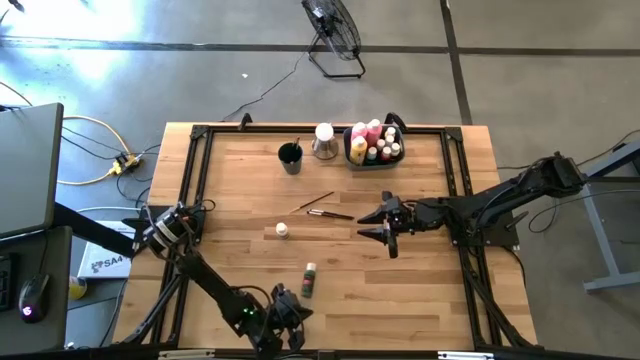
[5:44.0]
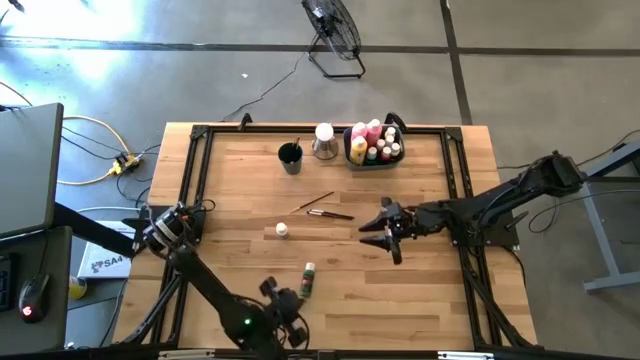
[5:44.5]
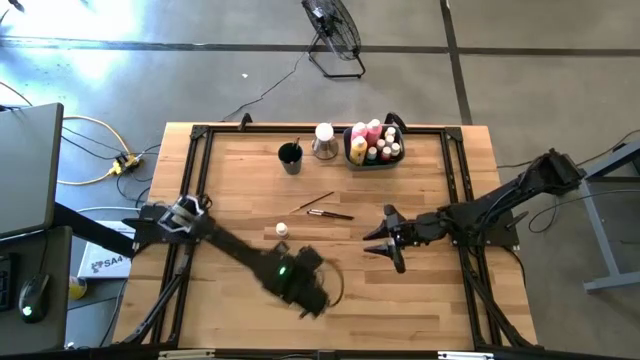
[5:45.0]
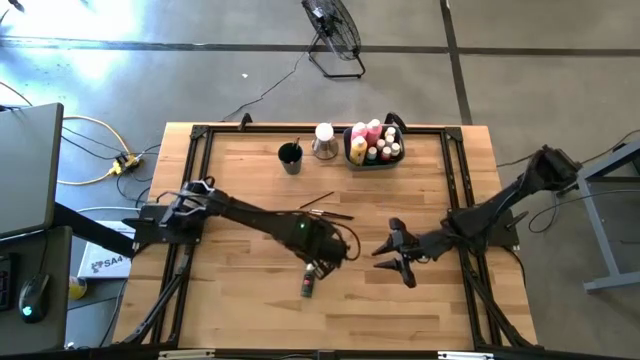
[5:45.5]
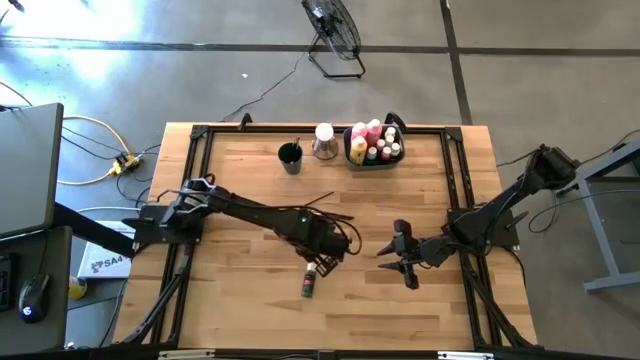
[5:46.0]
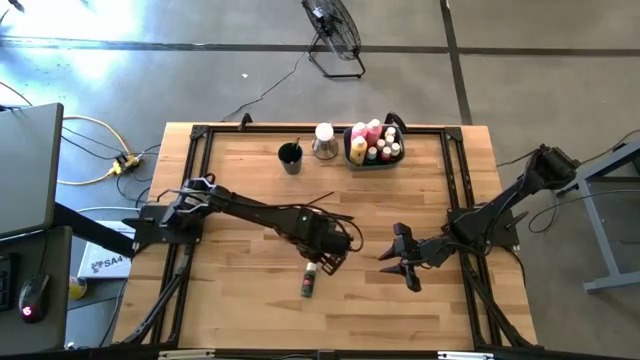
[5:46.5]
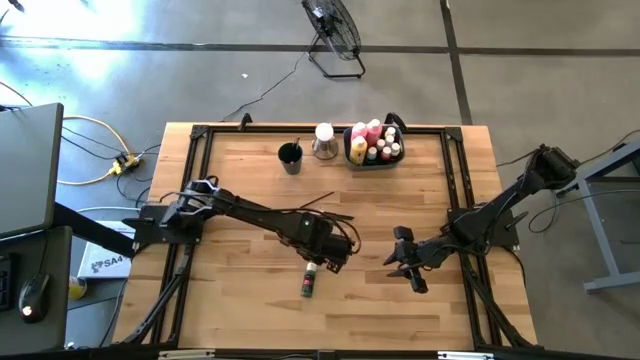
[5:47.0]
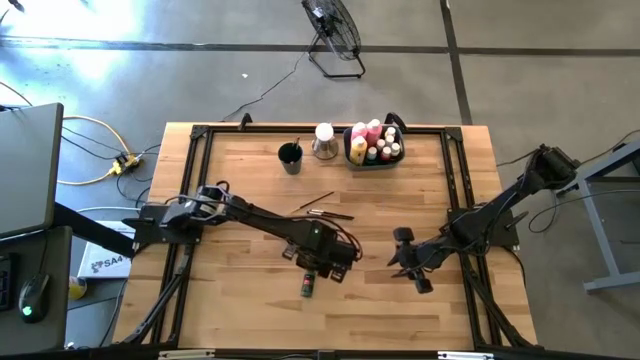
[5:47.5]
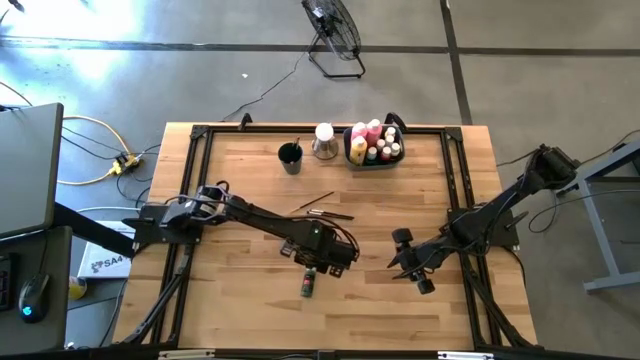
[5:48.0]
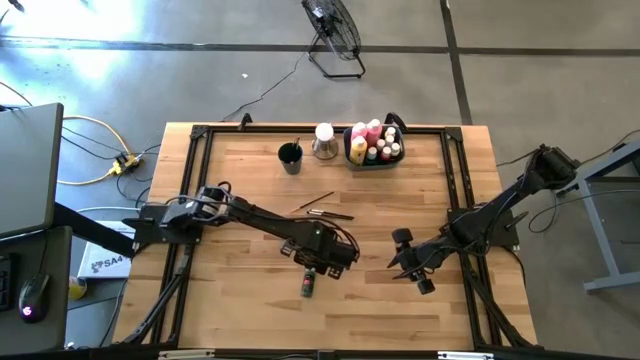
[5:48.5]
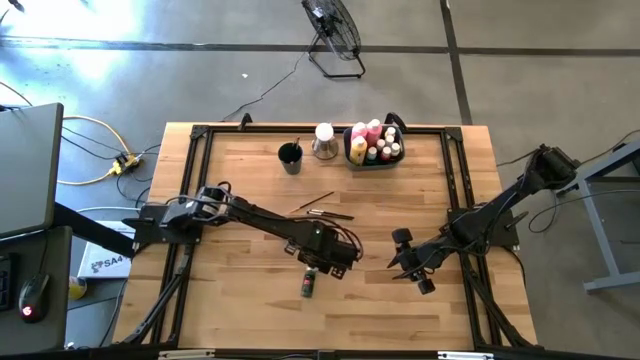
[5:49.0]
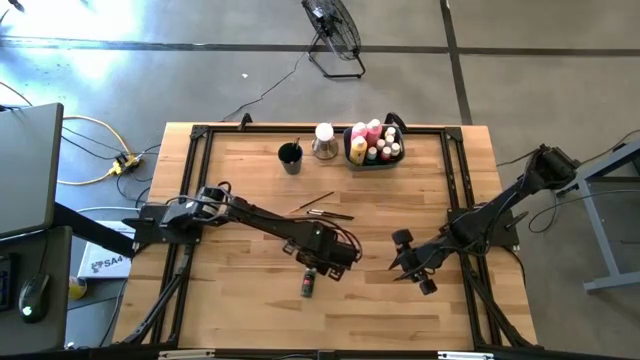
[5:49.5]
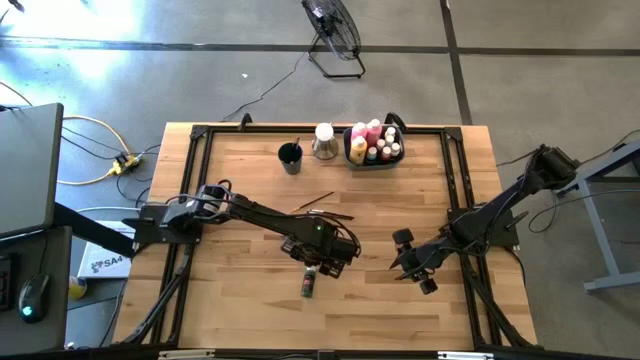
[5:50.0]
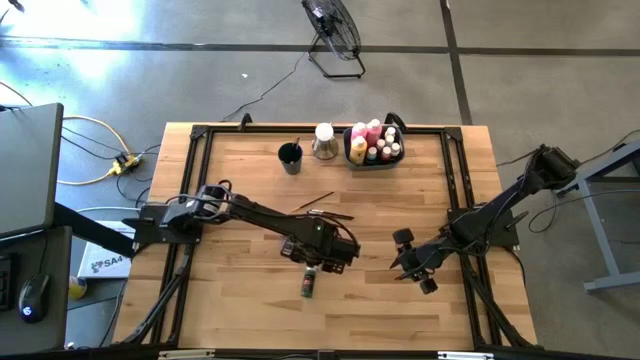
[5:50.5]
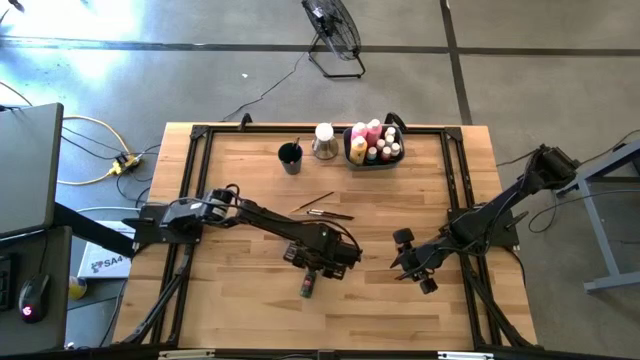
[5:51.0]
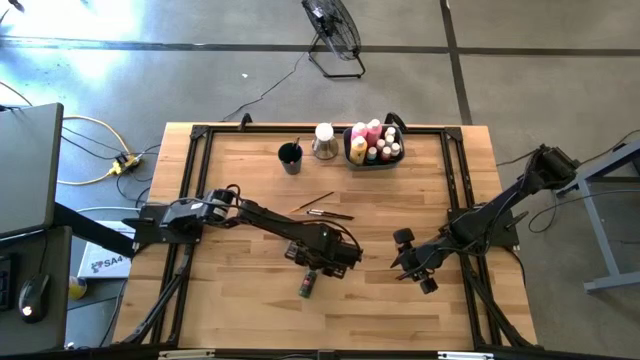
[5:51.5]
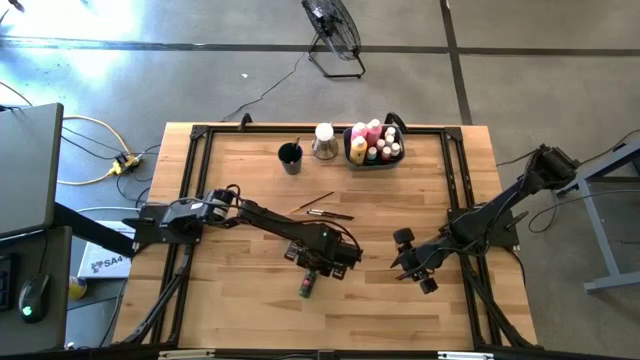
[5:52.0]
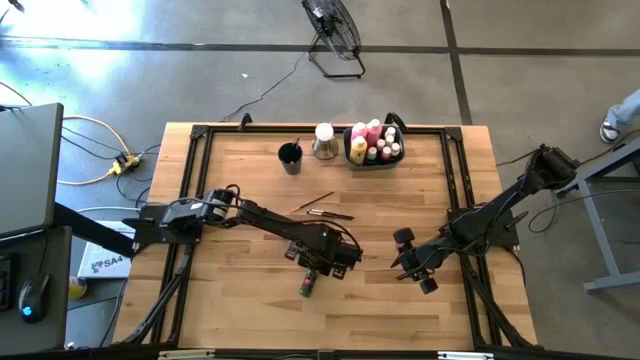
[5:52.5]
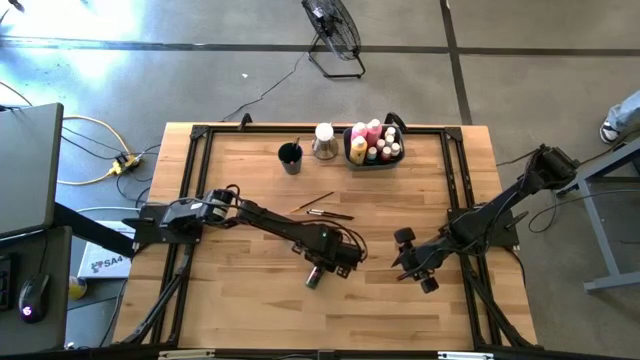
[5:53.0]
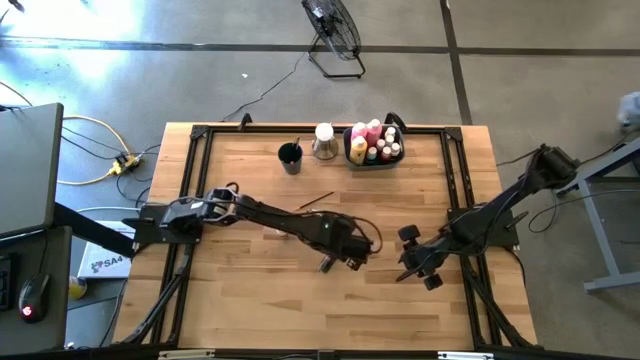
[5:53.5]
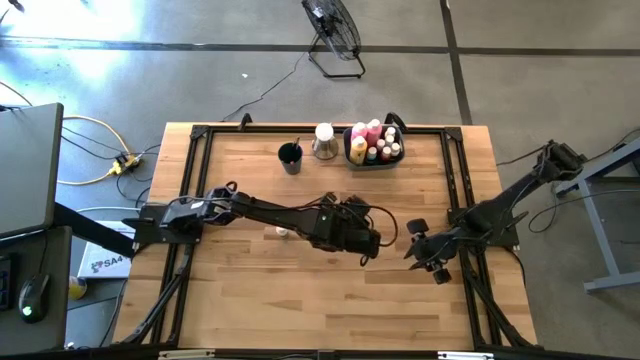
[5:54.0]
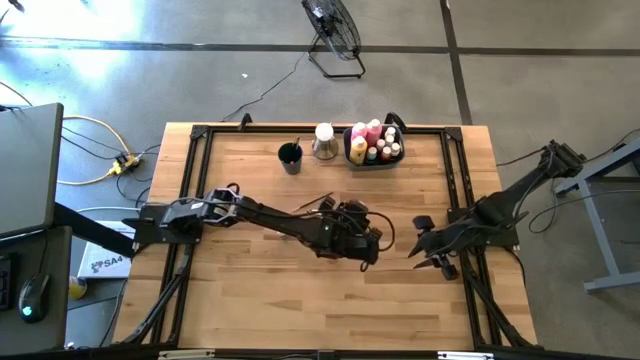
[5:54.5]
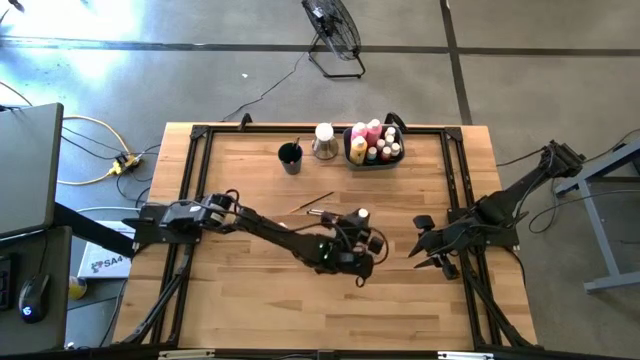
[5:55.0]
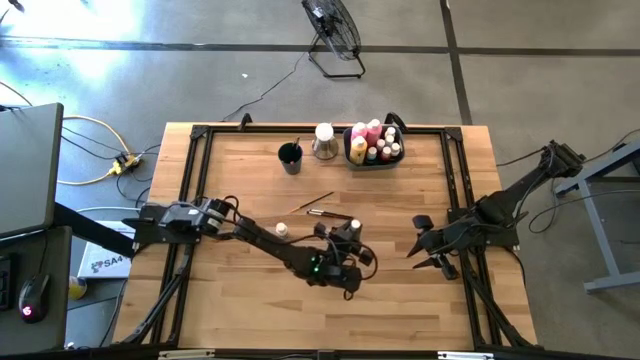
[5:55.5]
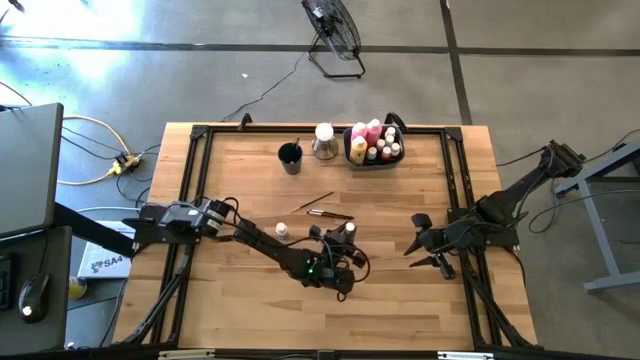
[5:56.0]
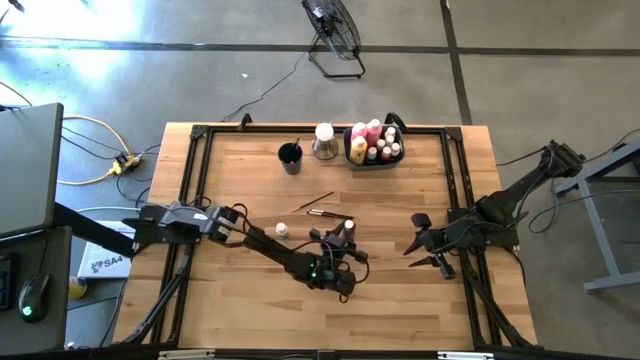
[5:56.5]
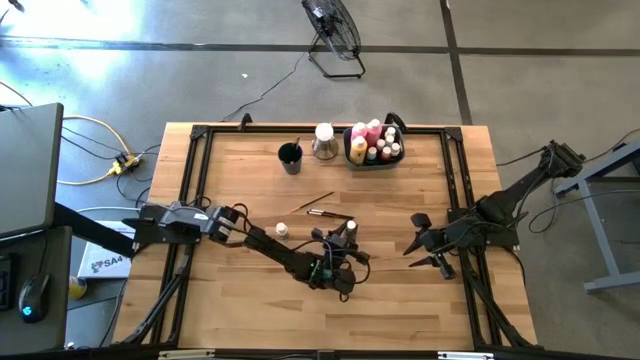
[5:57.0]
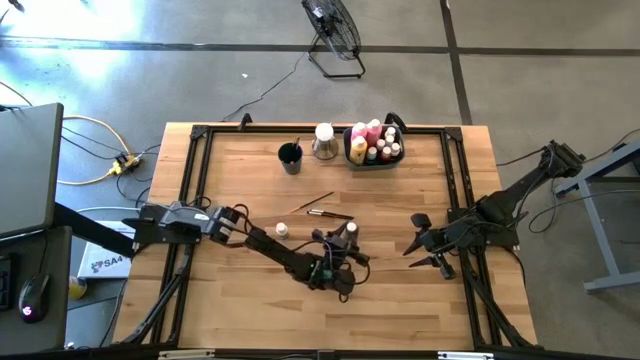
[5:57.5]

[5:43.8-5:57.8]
Task: Pick & Place Paint Supplies
Move the small green paint bottle to the center of the table
